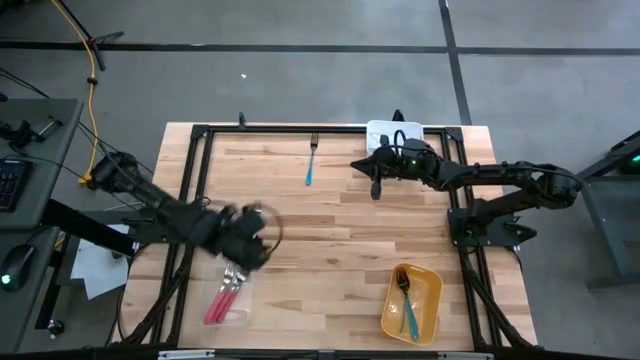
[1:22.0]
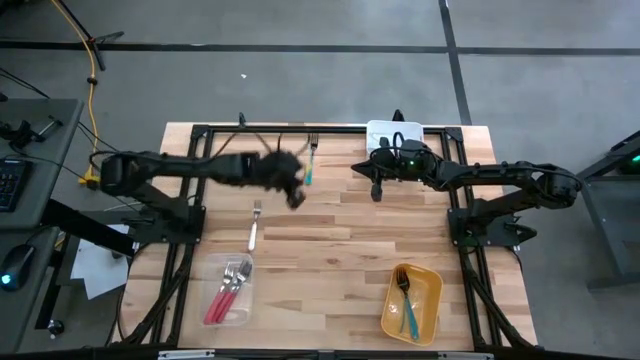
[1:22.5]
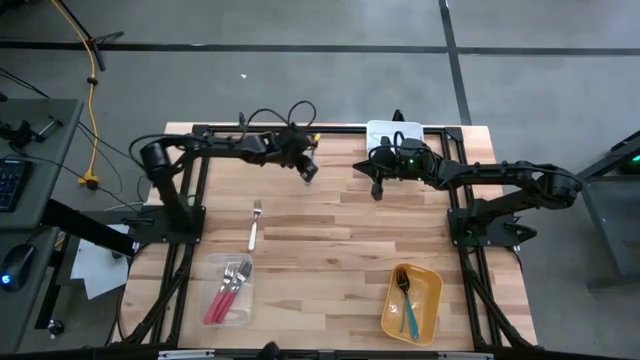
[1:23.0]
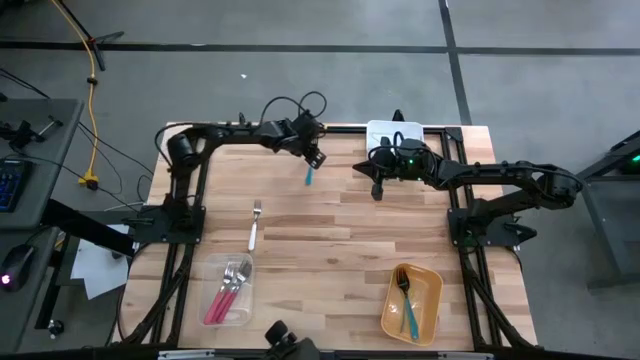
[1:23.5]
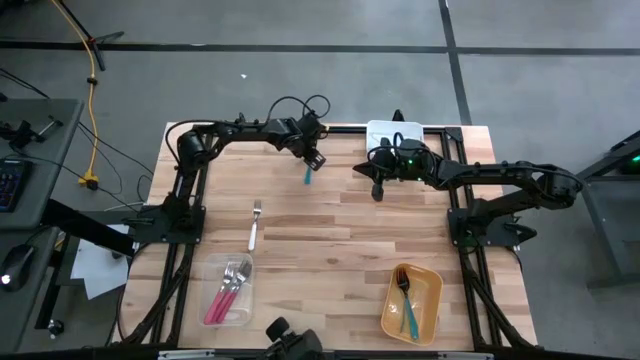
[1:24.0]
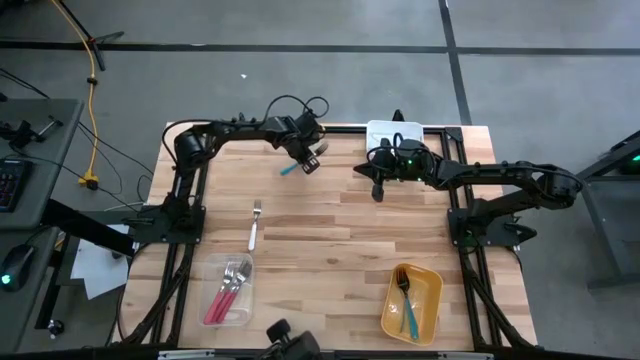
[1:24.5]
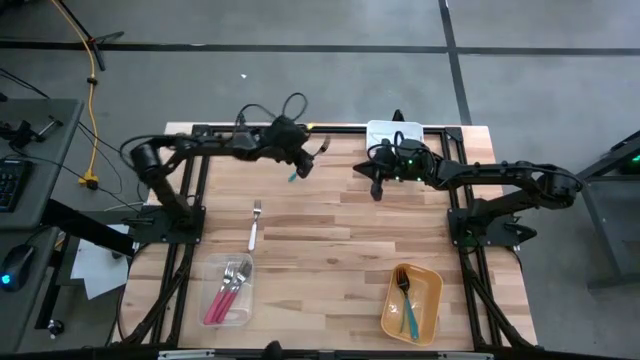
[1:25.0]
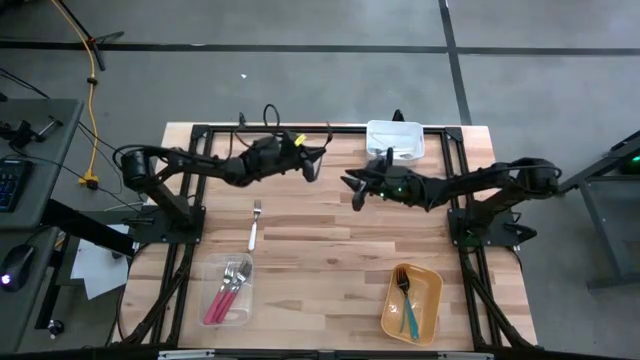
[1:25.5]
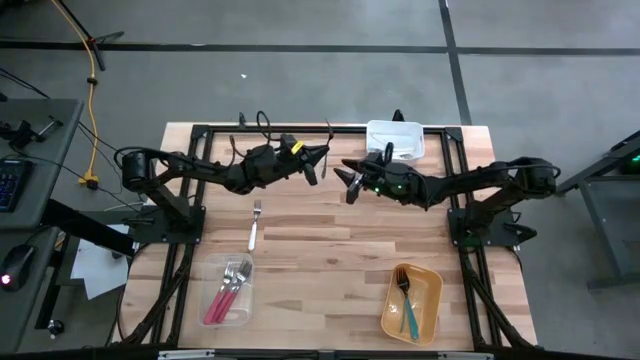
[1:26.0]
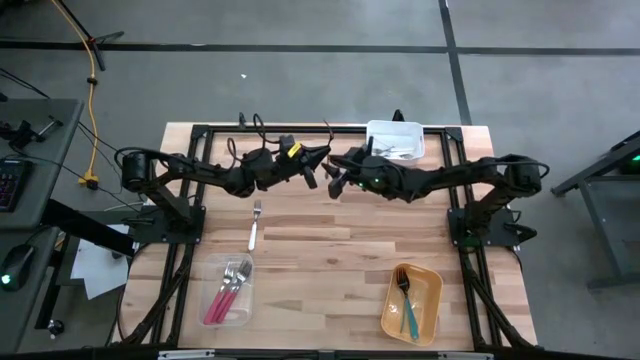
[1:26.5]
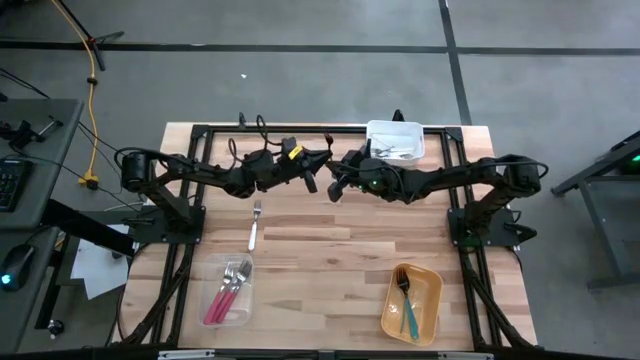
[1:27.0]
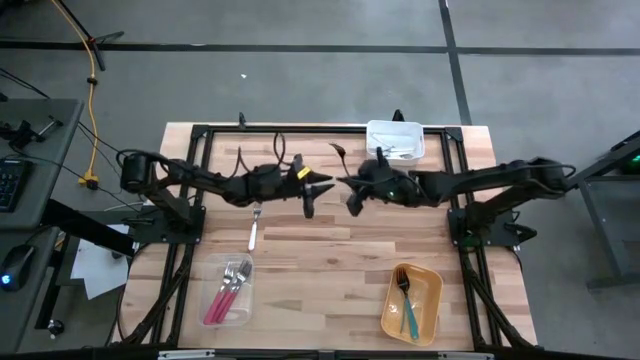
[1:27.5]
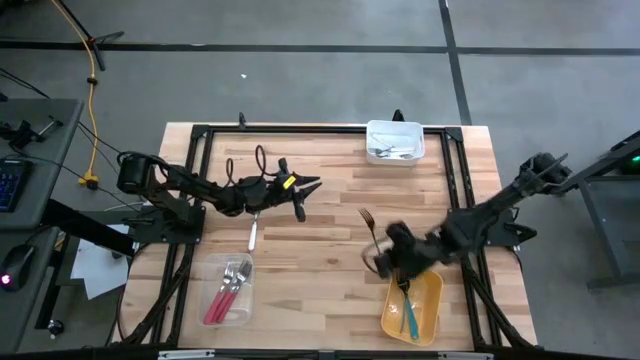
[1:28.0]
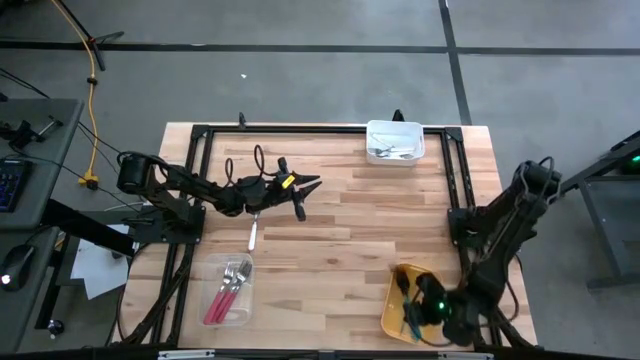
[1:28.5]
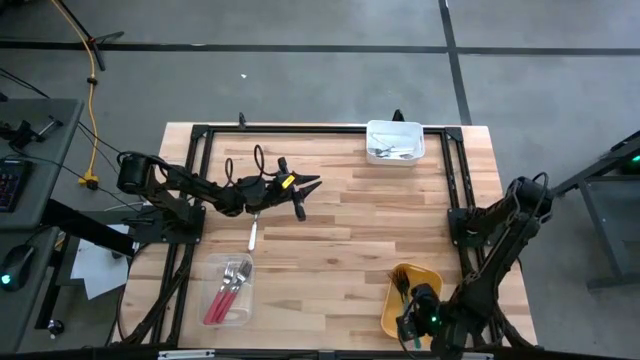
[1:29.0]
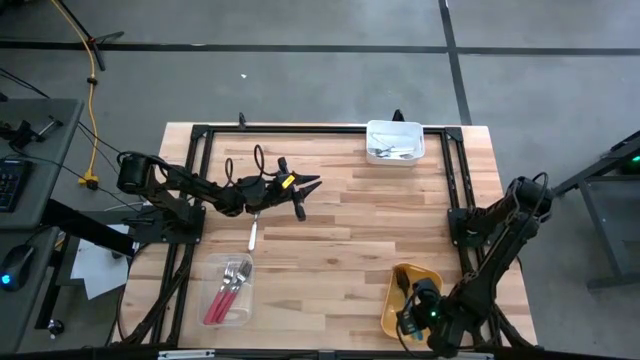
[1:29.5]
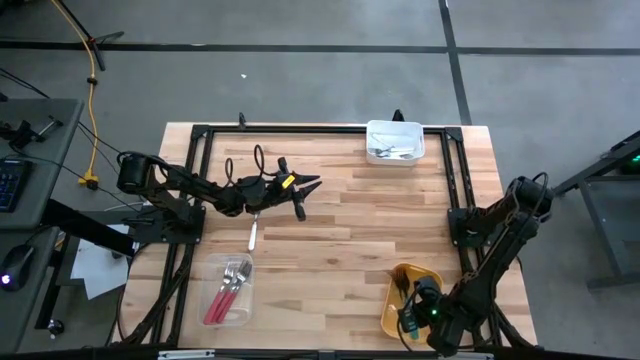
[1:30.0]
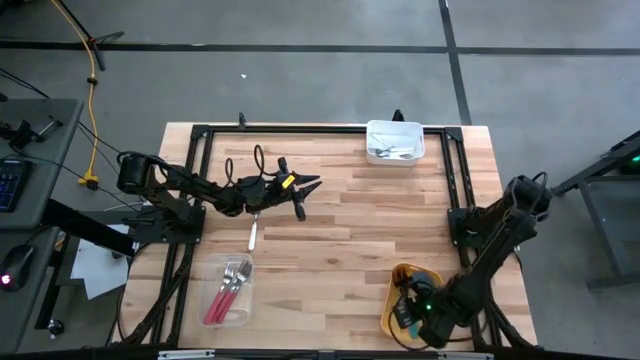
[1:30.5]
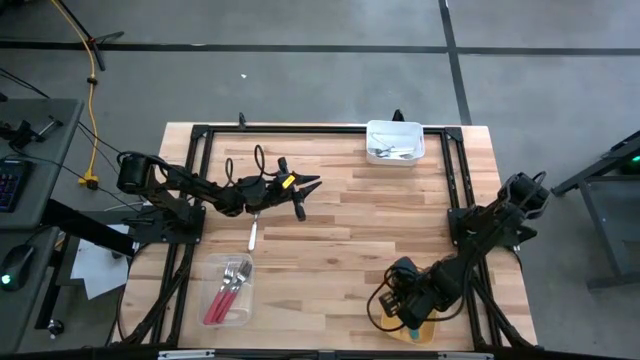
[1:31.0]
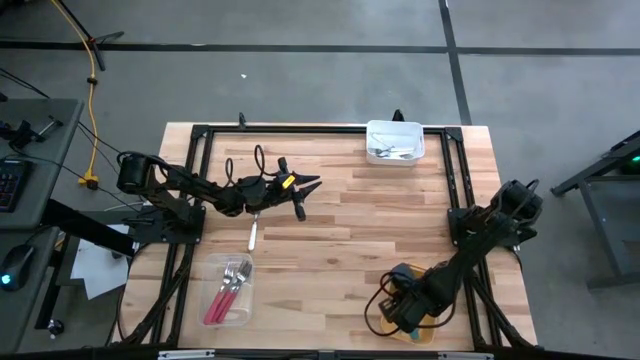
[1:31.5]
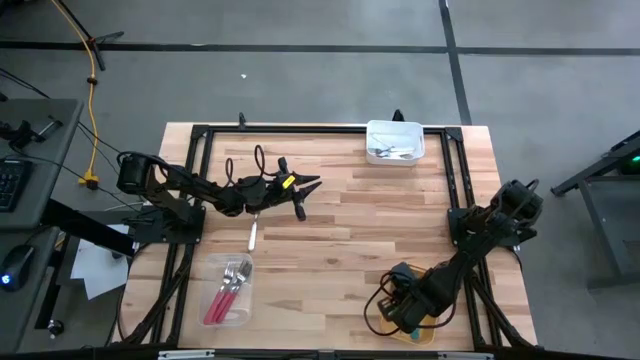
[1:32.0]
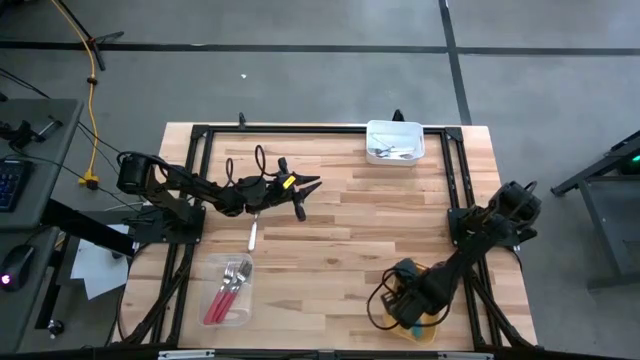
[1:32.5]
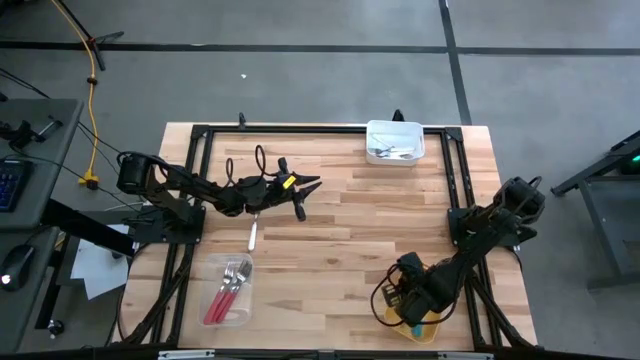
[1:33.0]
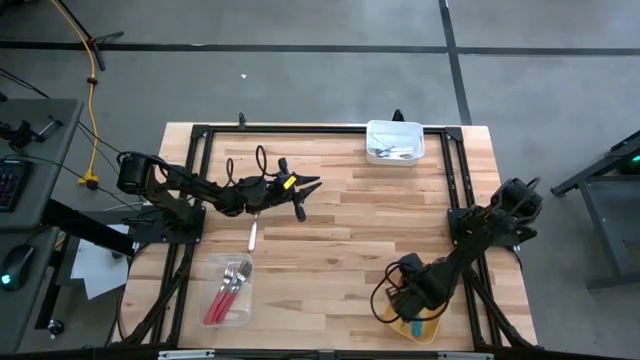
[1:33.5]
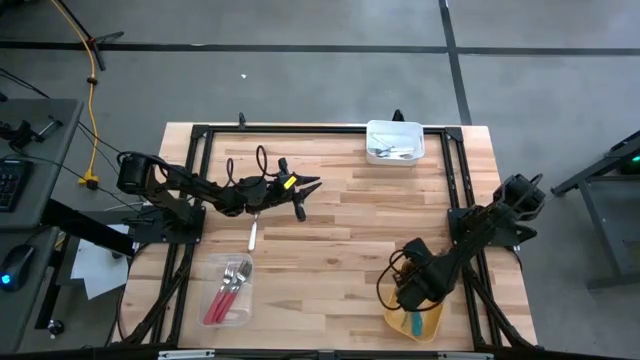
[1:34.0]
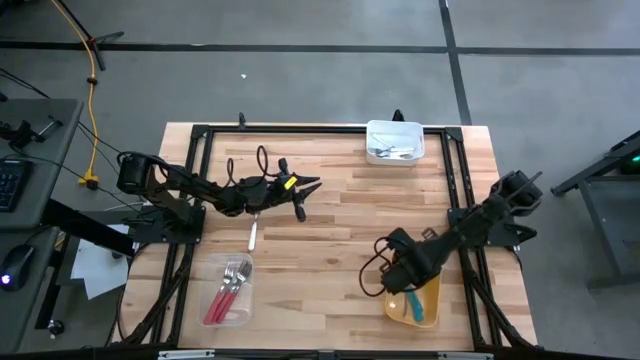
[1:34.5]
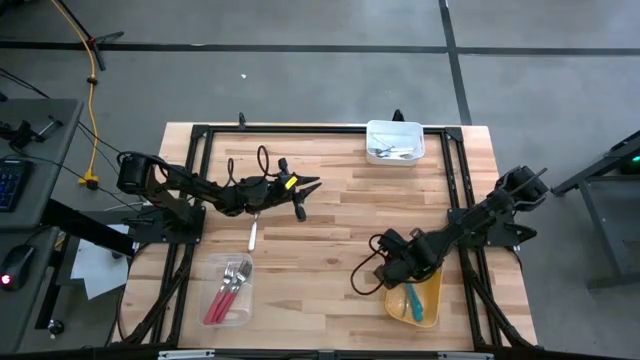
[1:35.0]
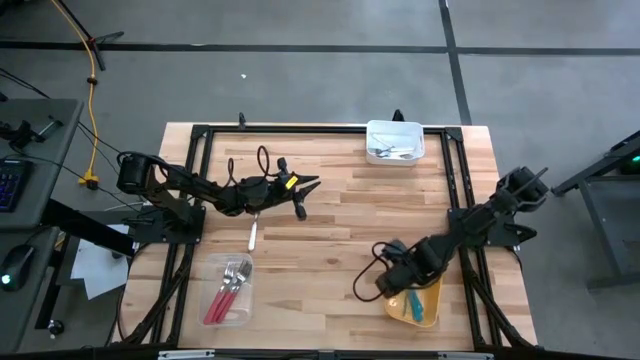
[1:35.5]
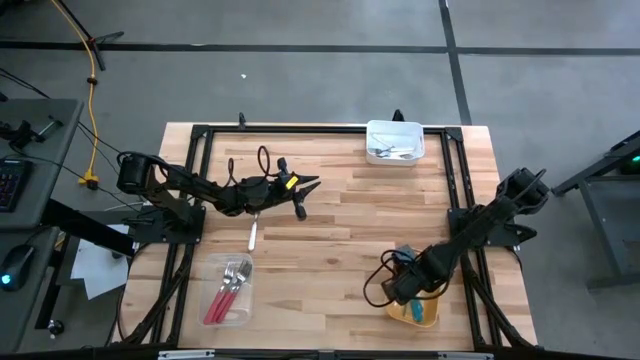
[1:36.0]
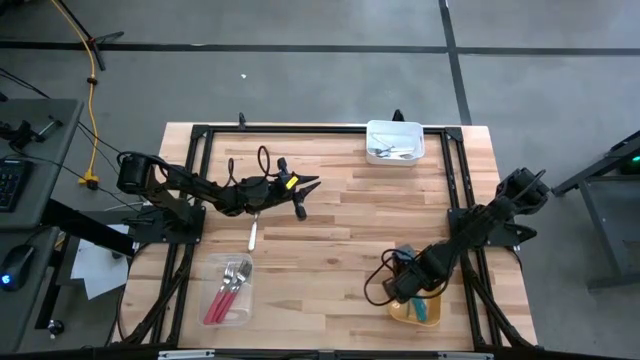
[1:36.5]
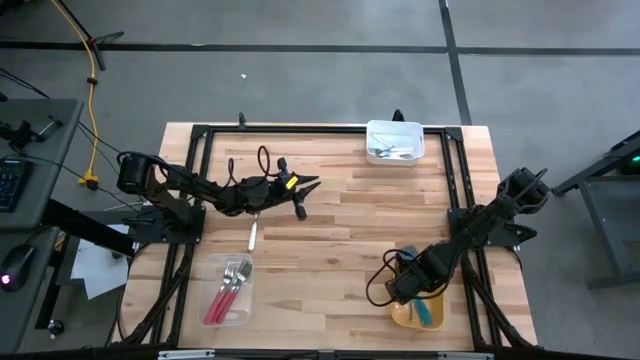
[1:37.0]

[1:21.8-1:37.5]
Task: Sort silverware by color (type)
Put the blue fork into the yellow bin

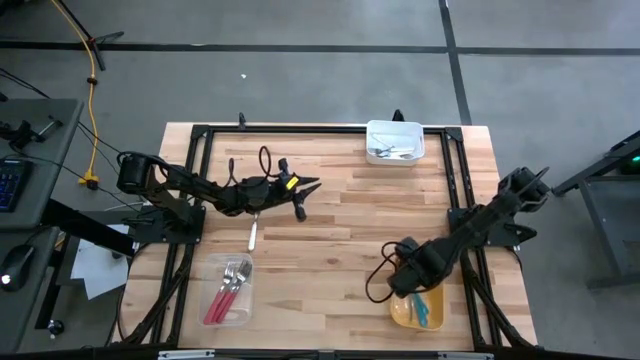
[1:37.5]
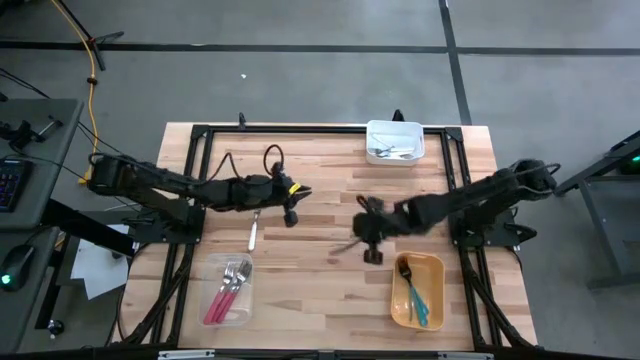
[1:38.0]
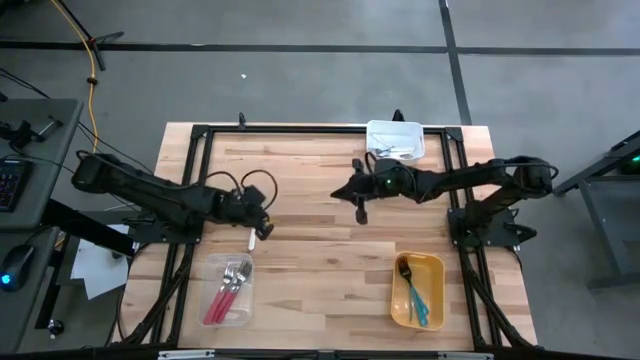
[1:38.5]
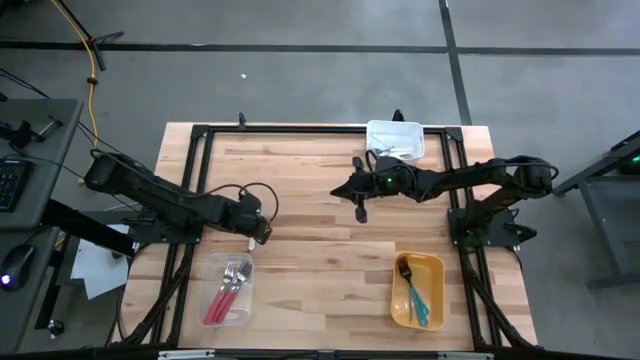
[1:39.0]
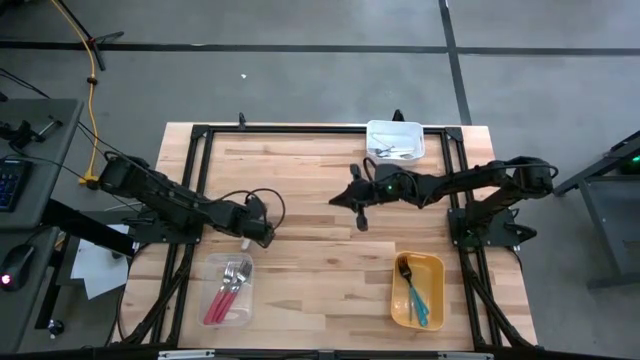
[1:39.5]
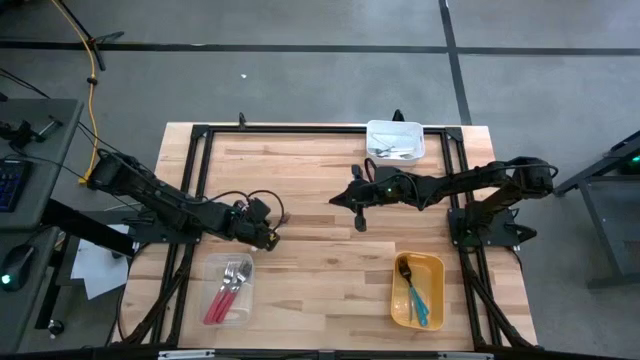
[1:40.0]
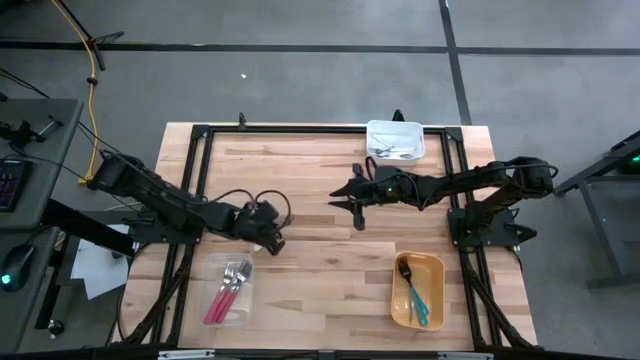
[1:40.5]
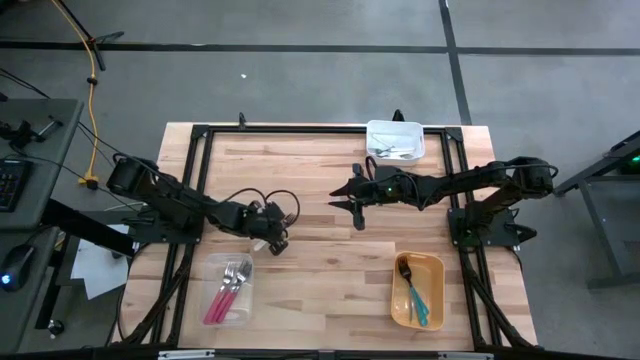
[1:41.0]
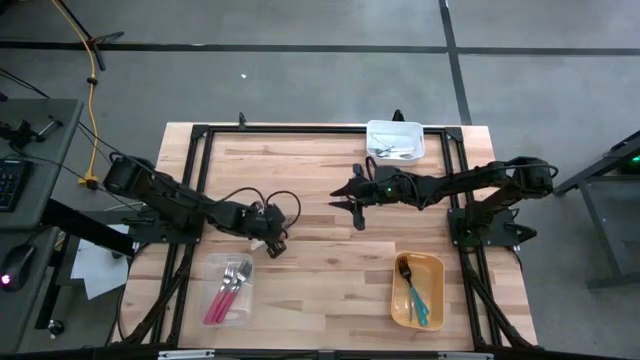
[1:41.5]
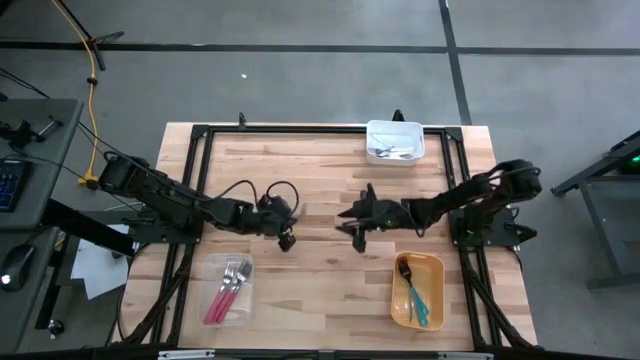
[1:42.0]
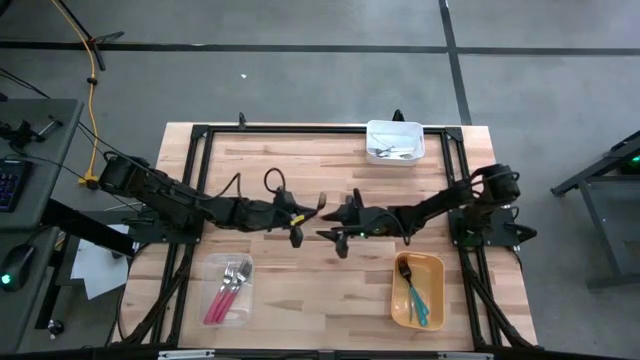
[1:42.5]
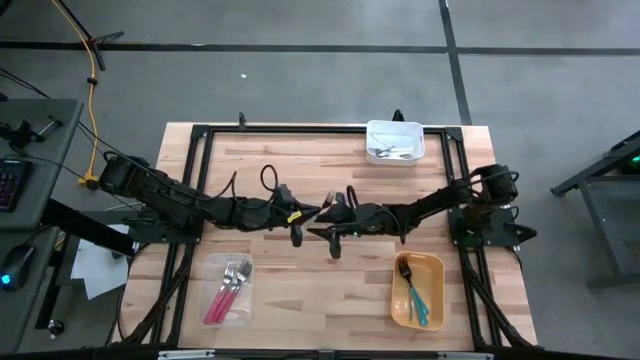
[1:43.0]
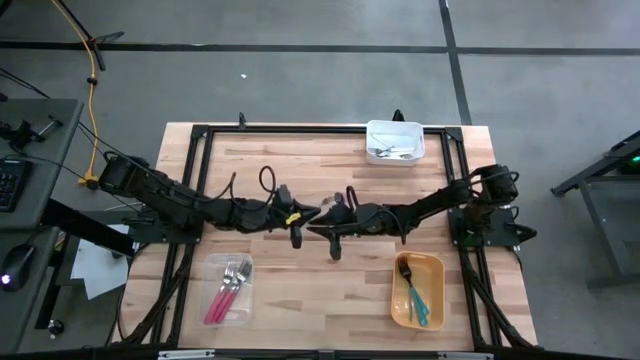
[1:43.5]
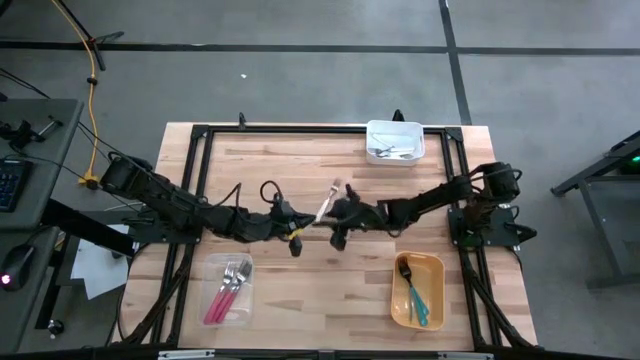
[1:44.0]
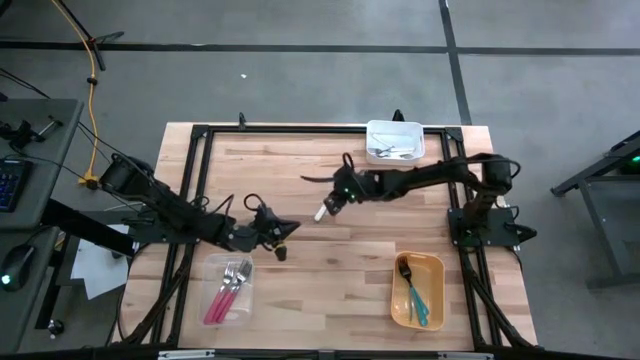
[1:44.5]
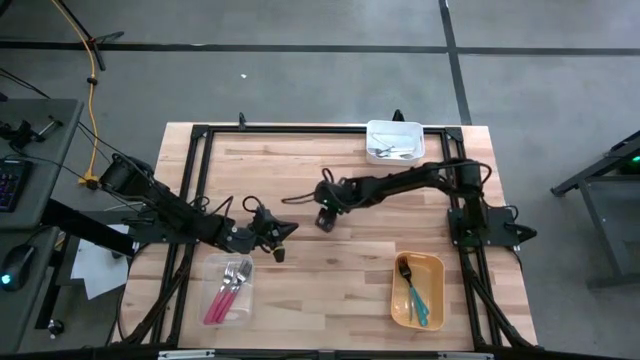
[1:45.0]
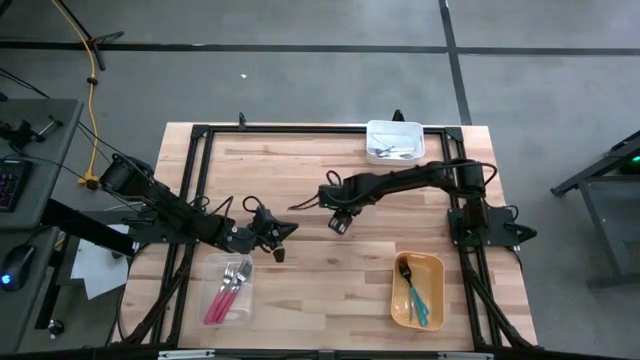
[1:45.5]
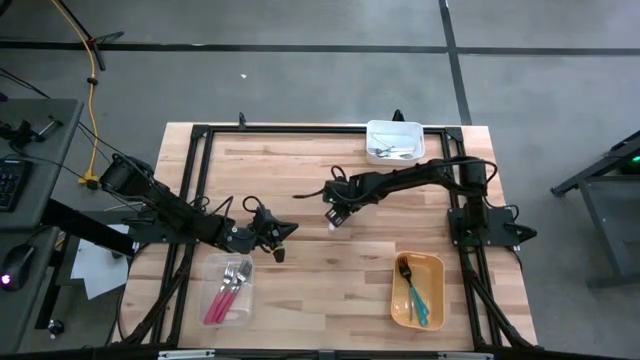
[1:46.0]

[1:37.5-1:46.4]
Put the white fork into the white bin
